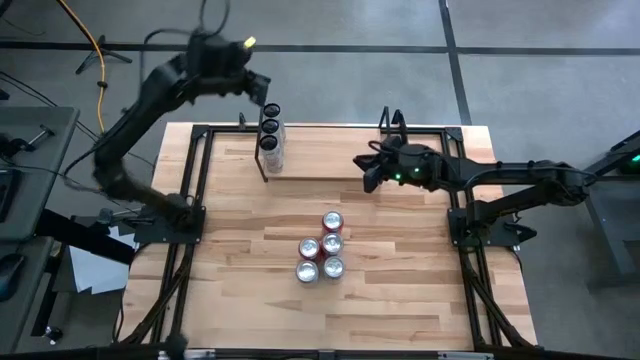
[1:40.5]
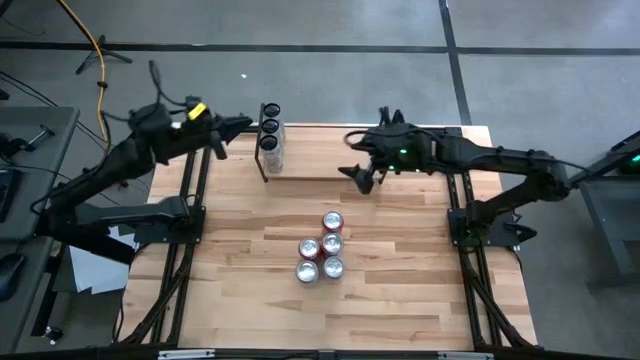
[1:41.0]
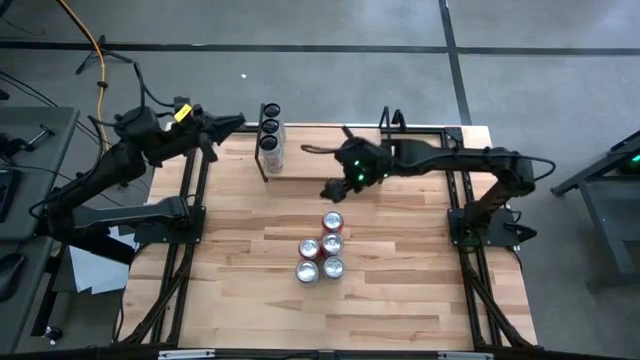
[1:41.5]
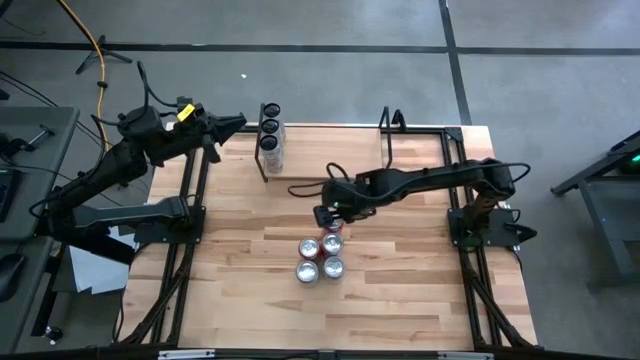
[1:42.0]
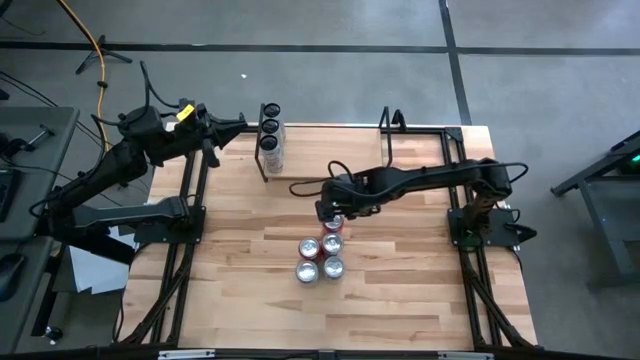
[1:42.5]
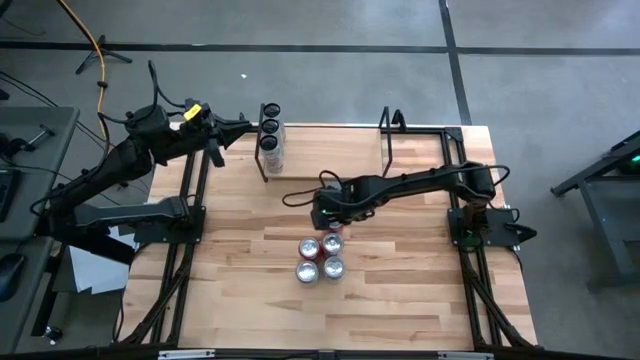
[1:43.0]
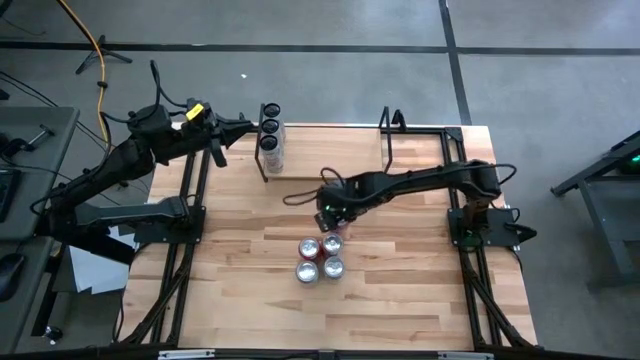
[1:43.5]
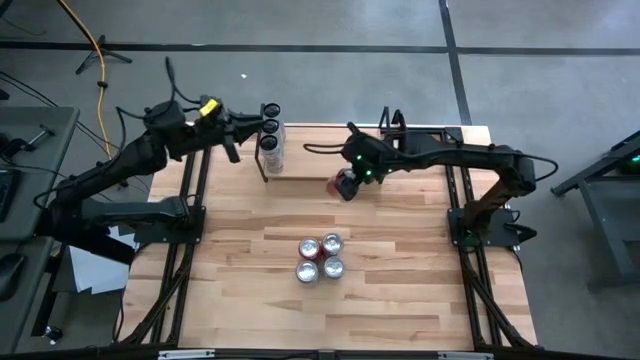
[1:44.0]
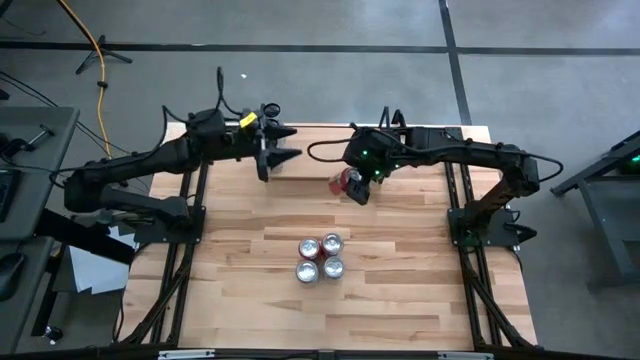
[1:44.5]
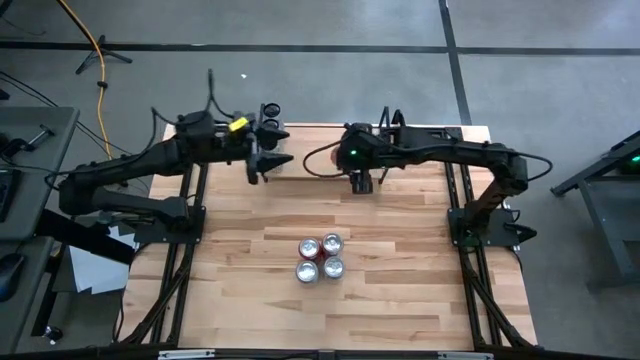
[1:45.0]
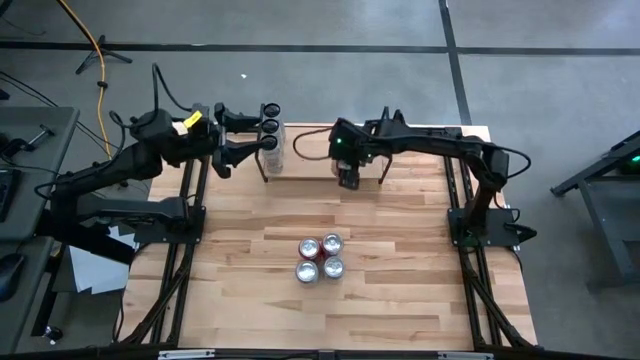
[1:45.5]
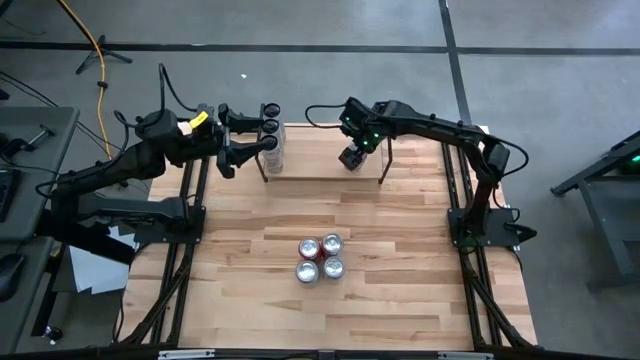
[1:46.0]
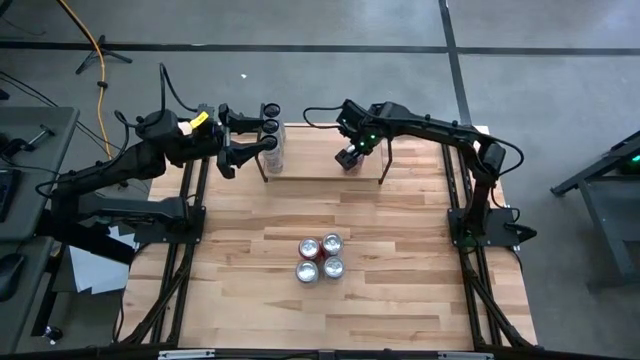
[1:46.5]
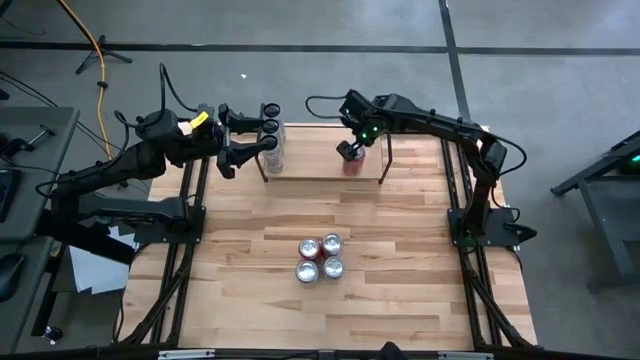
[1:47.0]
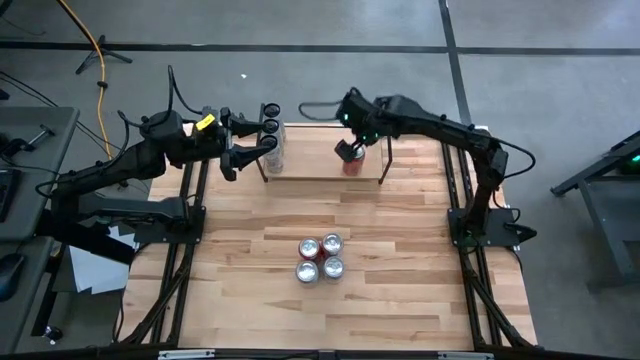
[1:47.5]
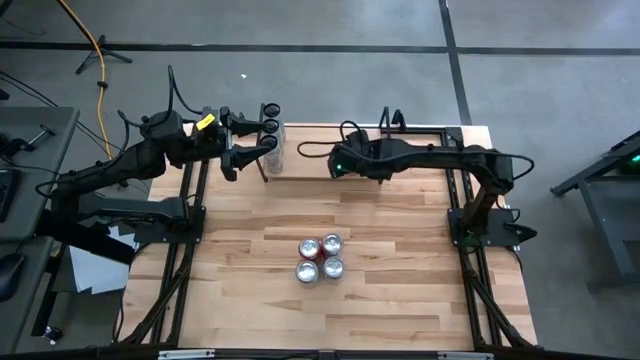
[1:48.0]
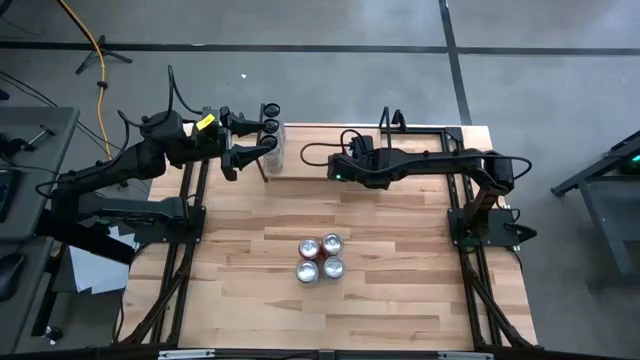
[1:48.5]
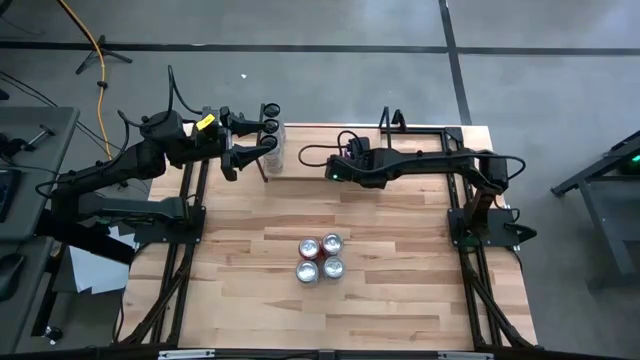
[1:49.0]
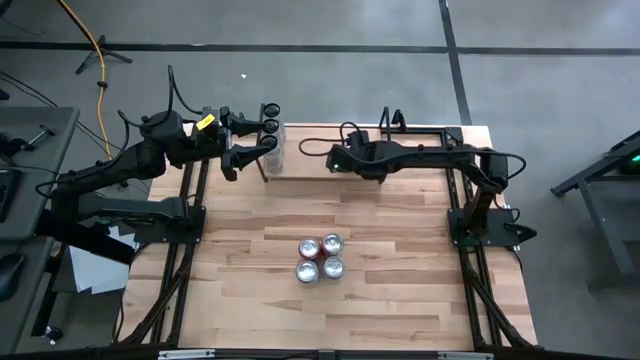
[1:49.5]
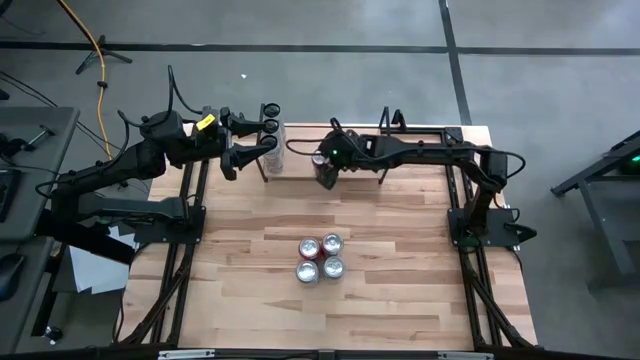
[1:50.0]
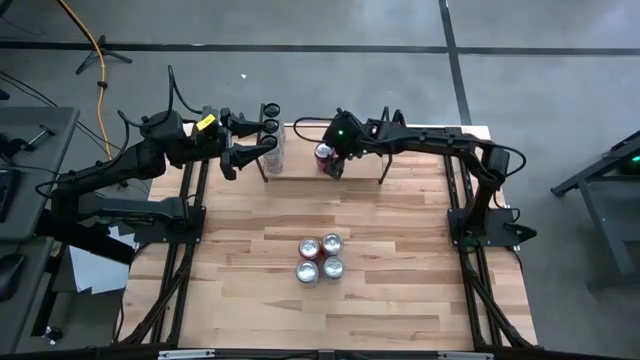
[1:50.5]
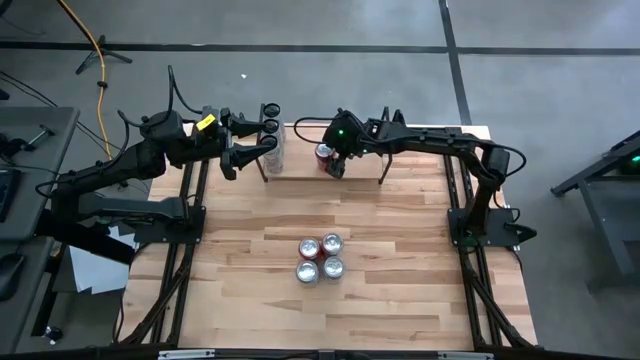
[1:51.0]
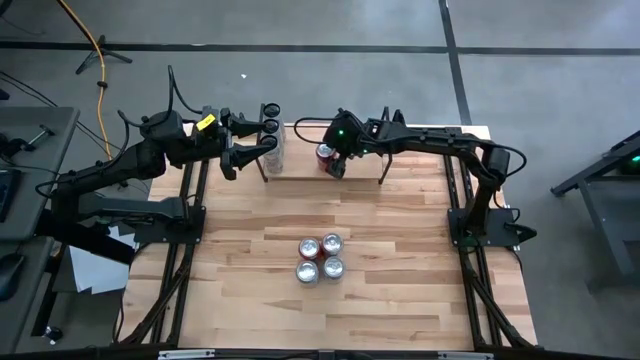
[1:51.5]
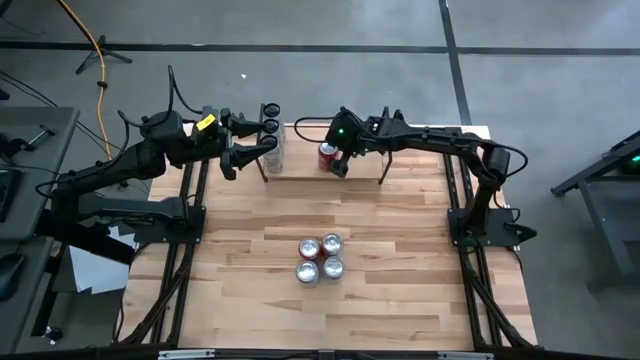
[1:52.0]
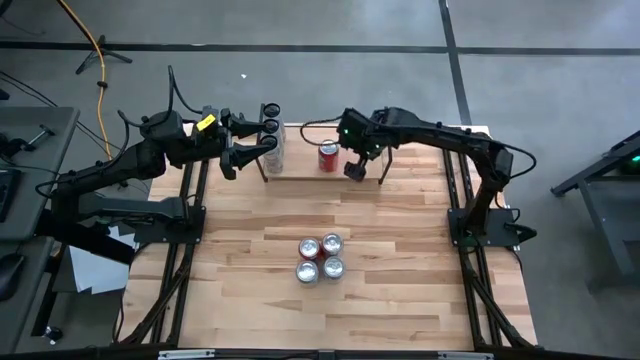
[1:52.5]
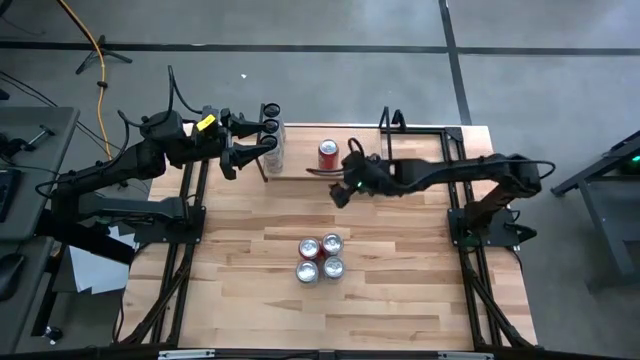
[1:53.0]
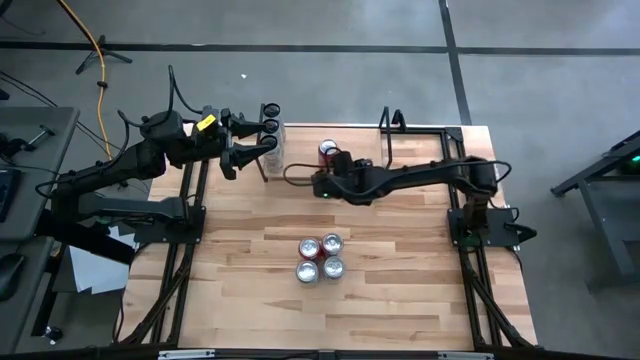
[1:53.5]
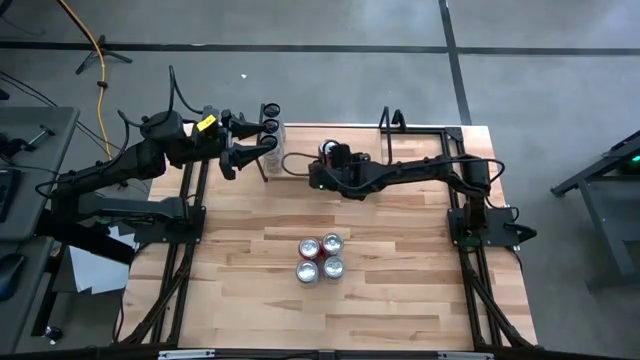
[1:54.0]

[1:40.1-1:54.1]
Task: Place canned beverage on shelf
Put the top orange soda can on the shelf

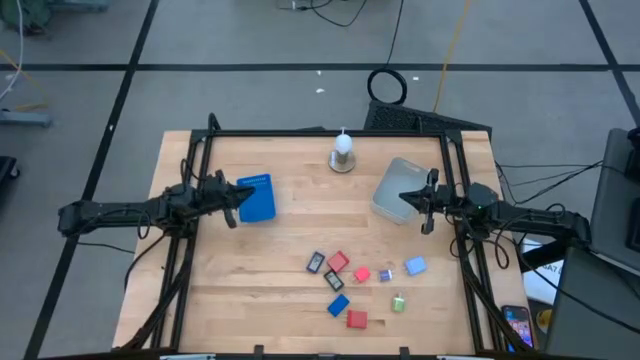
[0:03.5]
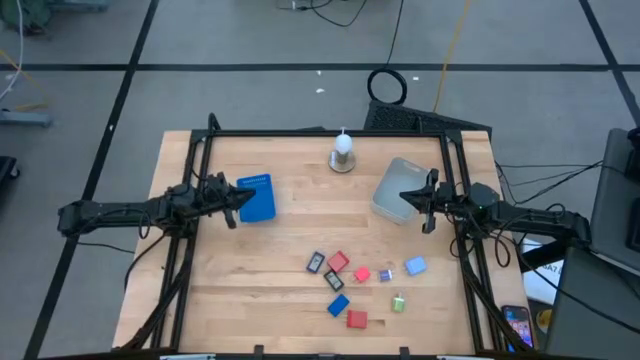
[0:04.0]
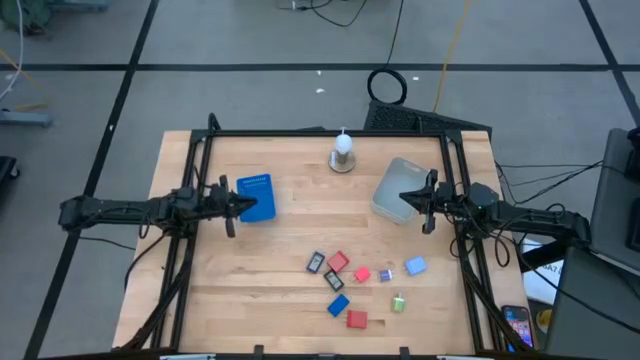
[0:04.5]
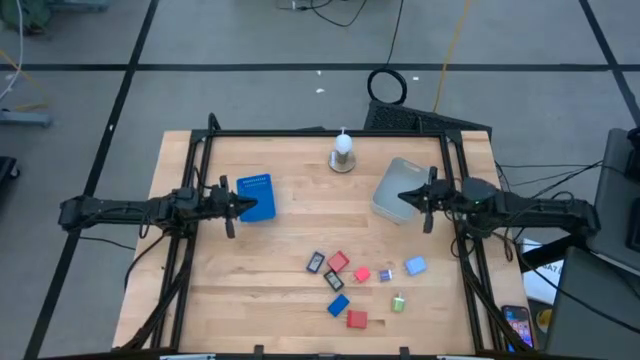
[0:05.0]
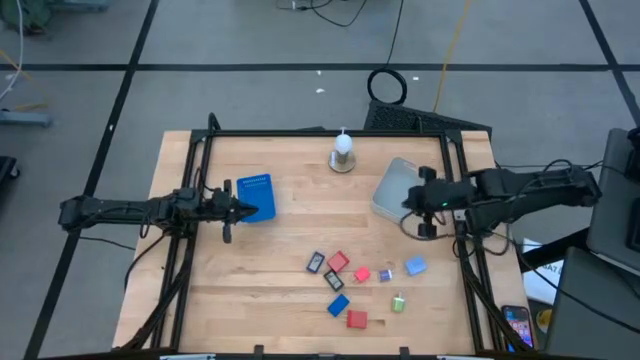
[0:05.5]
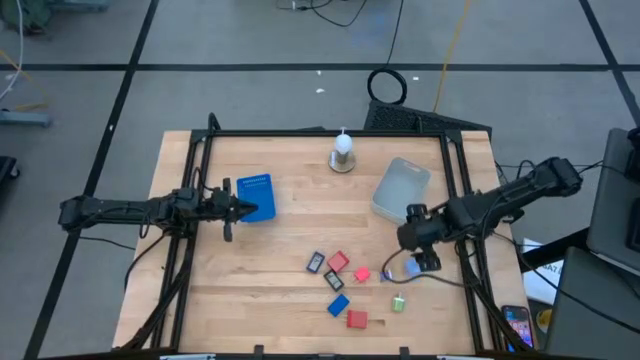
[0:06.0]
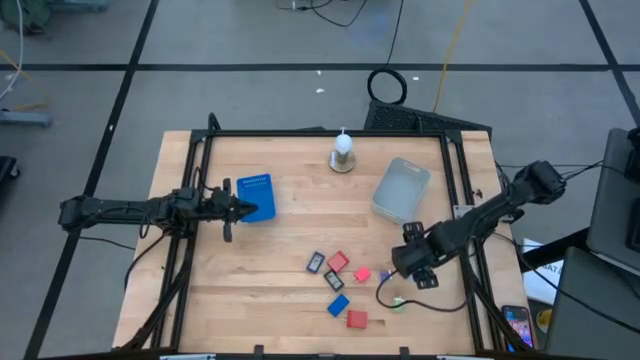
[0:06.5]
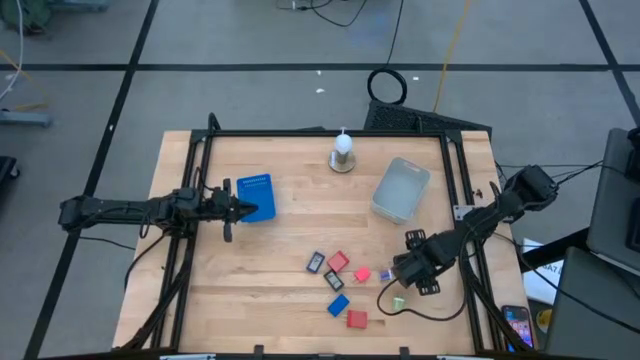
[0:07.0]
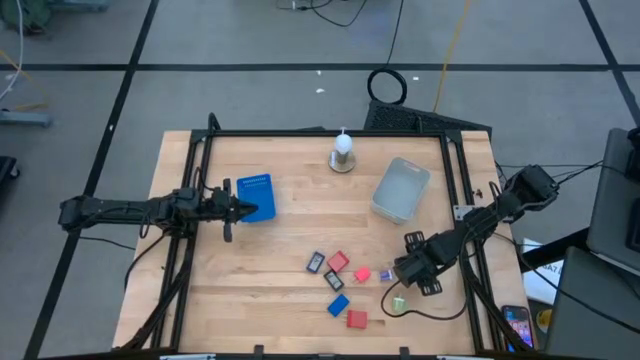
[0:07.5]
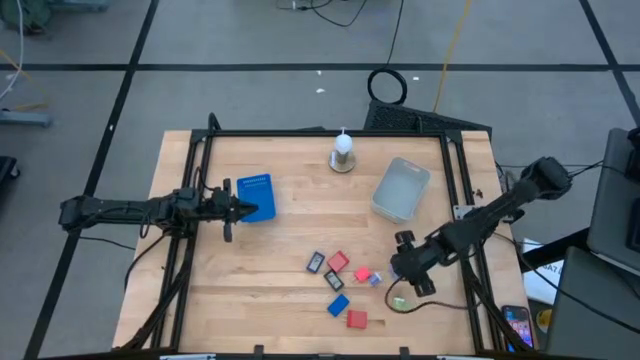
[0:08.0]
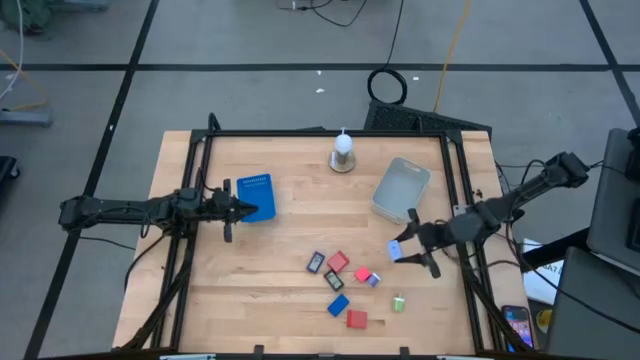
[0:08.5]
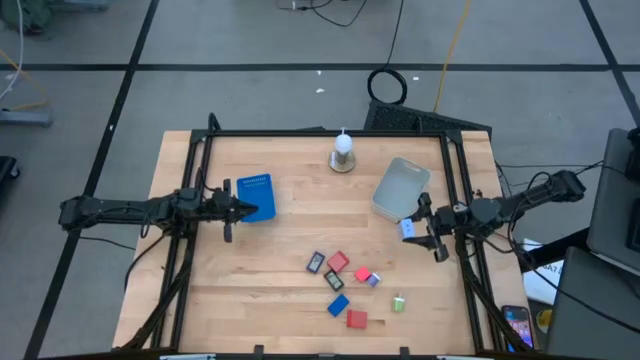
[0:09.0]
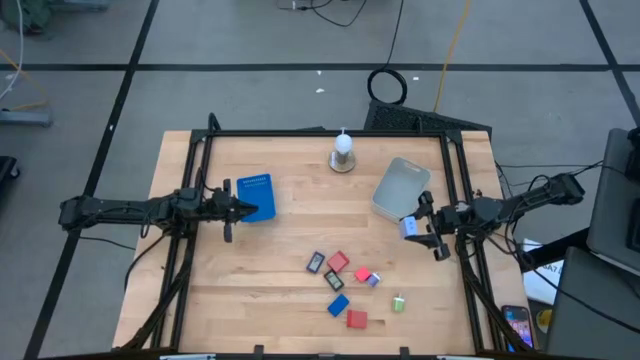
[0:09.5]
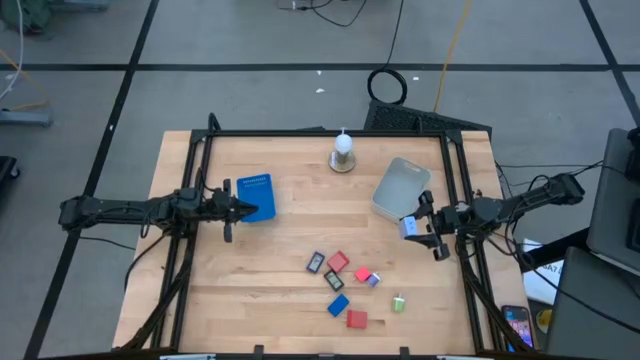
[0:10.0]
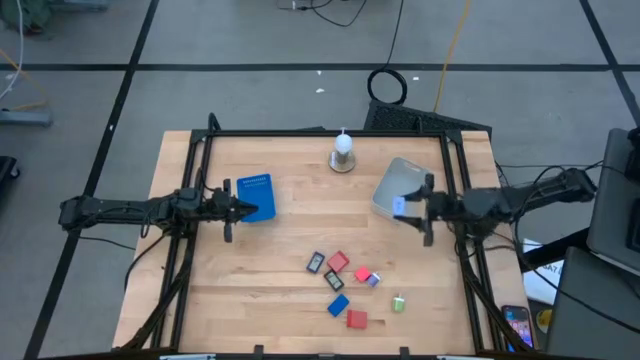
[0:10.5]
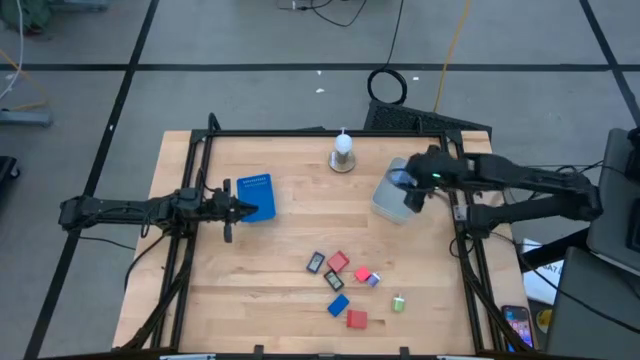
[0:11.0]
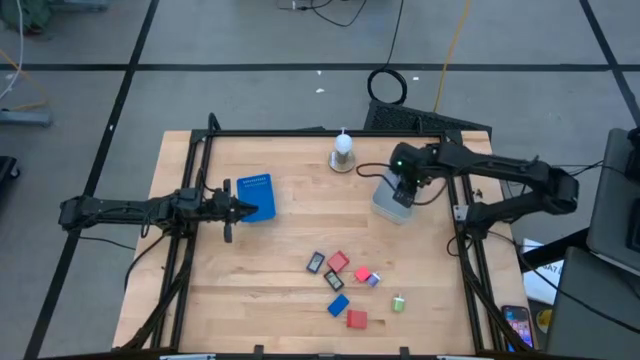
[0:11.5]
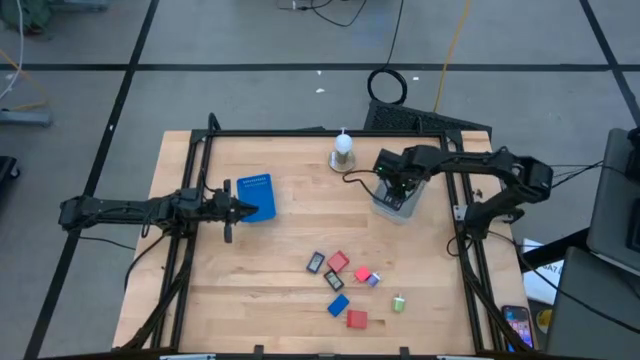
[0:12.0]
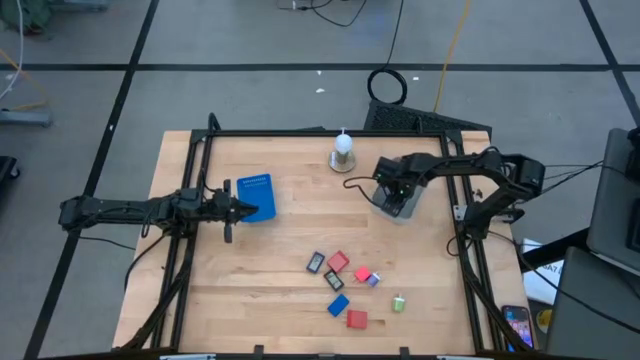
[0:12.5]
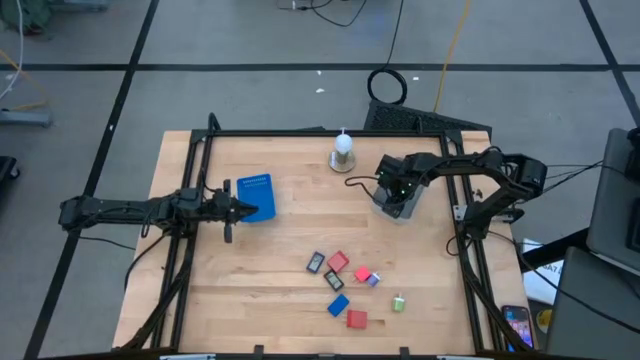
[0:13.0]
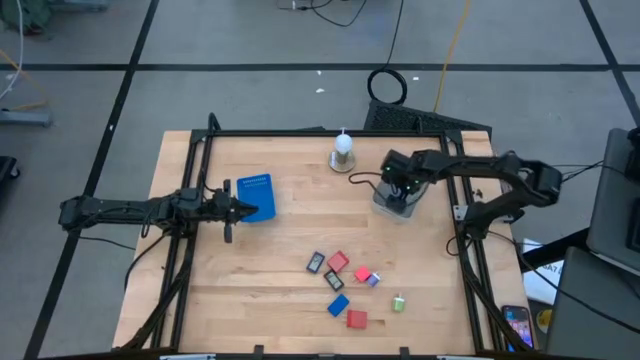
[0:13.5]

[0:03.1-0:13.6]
Task: Pick & Place Office items
Put the gray charger adapter into the gray bin
